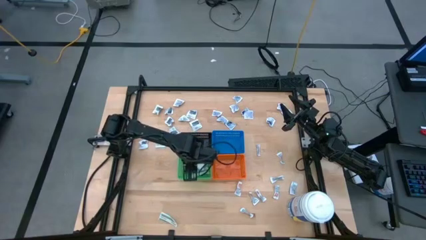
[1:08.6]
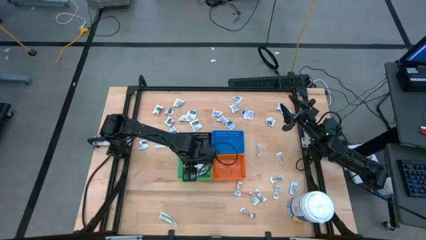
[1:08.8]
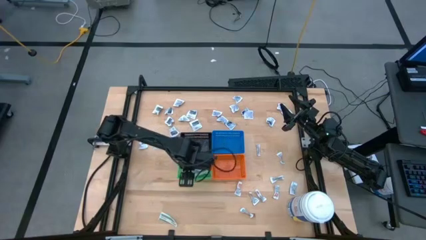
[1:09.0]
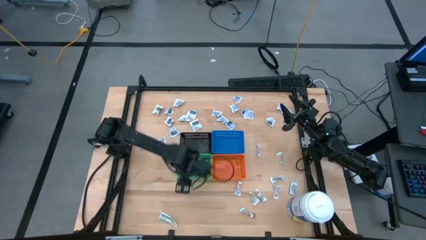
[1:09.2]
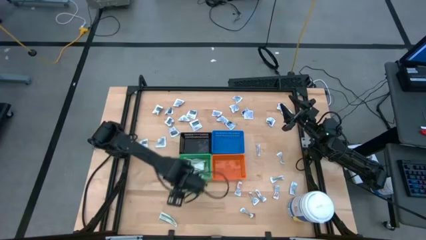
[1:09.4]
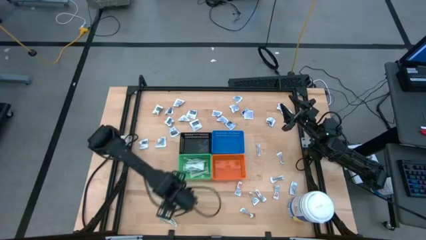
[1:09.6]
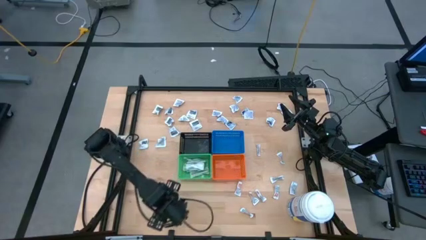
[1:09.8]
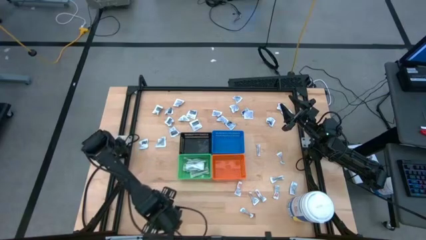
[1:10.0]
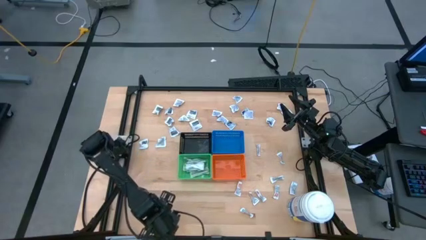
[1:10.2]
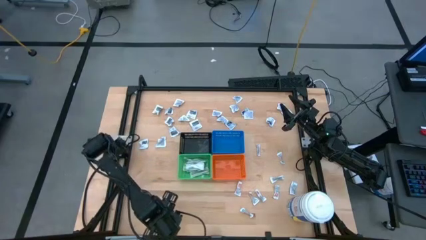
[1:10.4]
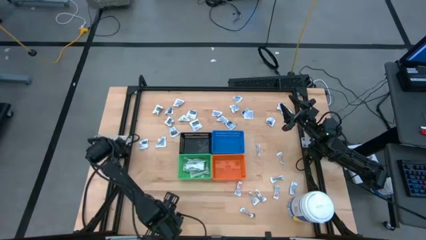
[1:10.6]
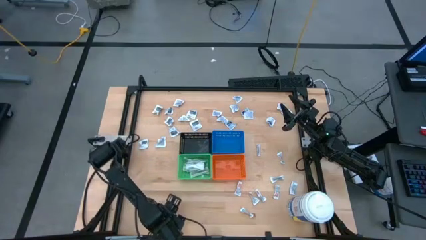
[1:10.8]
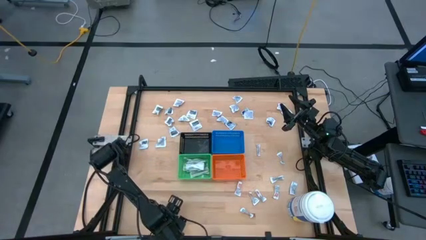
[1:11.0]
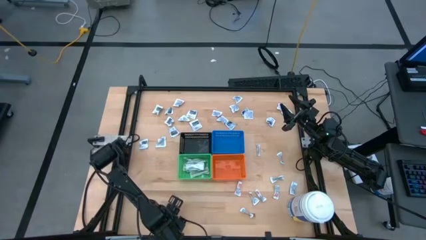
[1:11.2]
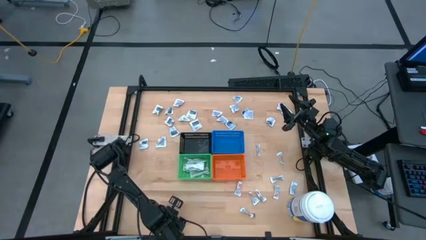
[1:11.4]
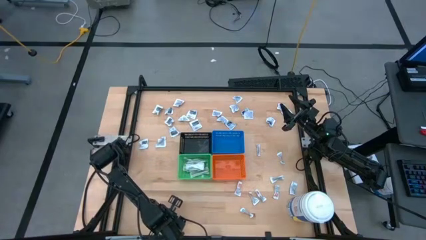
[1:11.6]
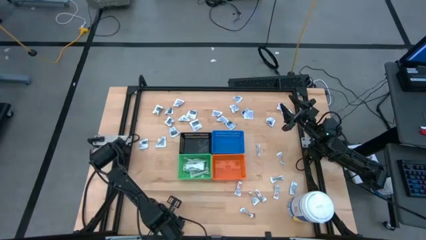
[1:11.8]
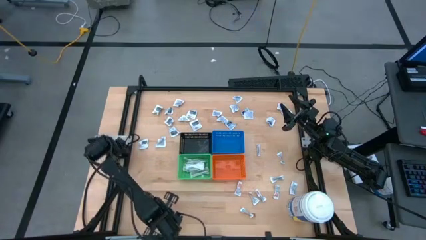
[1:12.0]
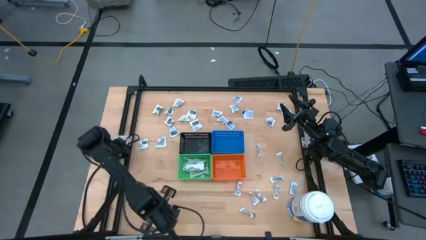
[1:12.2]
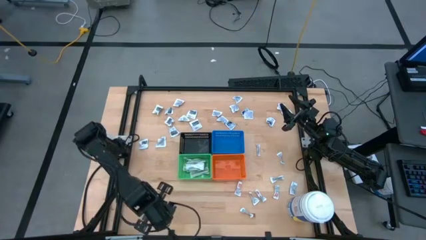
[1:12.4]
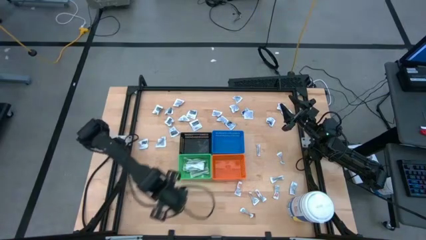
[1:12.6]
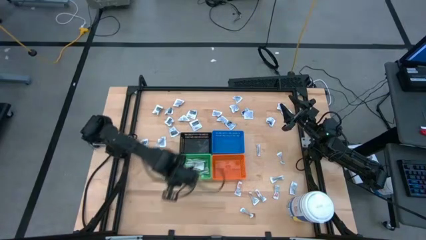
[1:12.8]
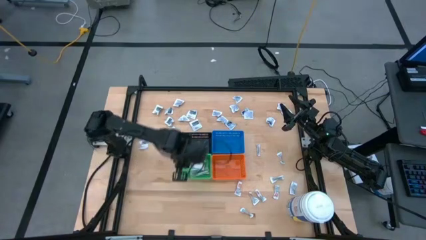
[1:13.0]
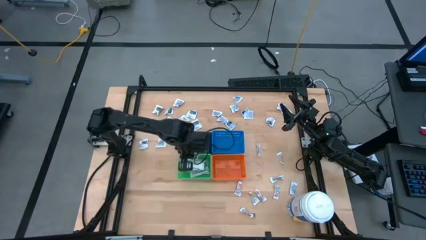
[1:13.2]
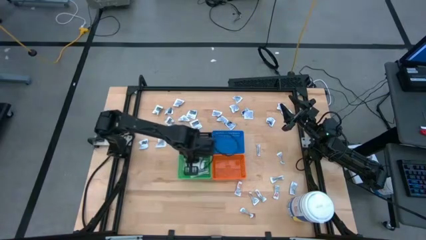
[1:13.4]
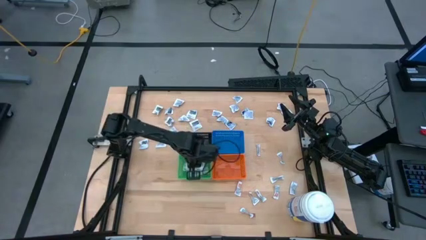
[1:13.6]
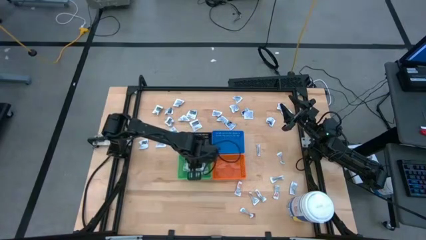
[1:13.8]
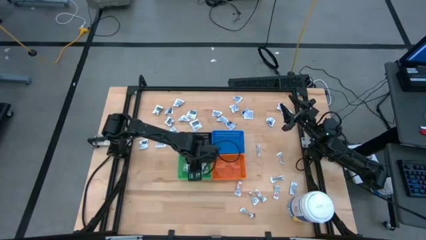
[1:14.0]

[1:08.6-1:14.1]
Task: Pick & Place First Aid Supplies
Put the bandage into the green bin

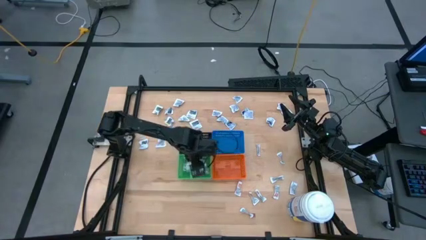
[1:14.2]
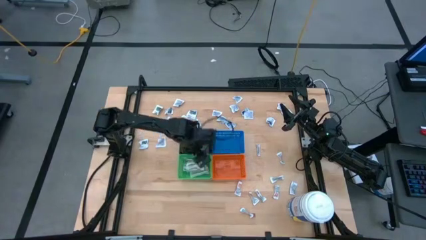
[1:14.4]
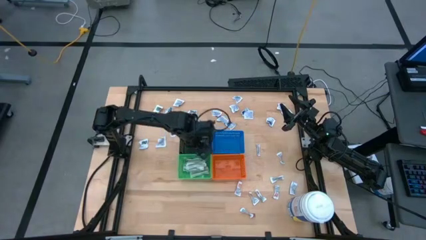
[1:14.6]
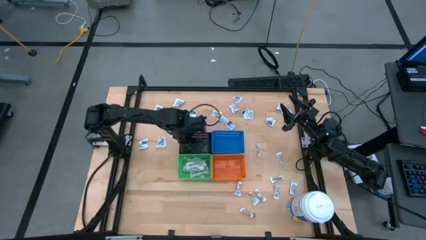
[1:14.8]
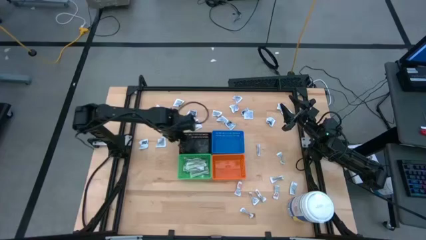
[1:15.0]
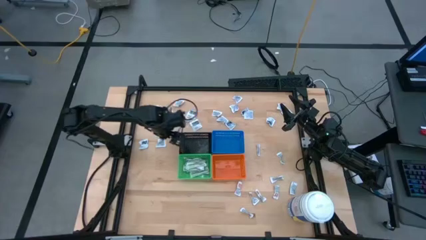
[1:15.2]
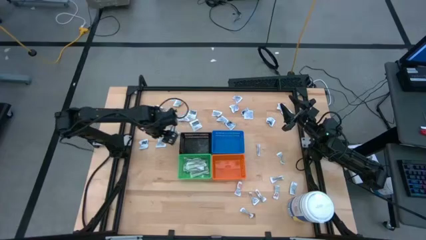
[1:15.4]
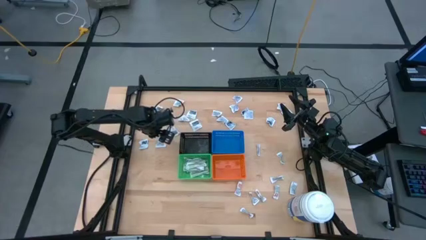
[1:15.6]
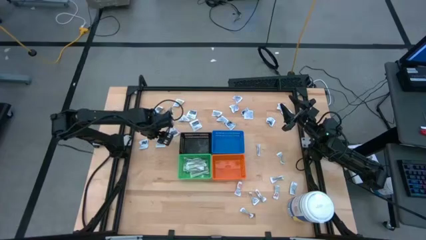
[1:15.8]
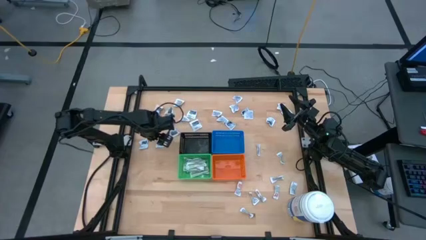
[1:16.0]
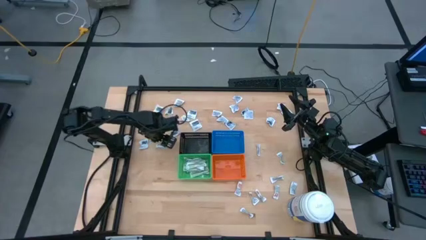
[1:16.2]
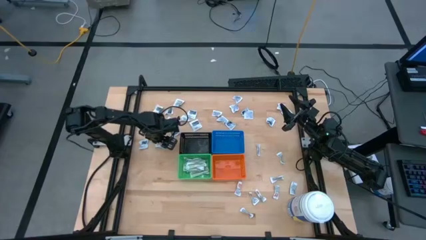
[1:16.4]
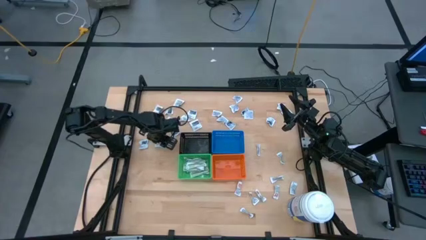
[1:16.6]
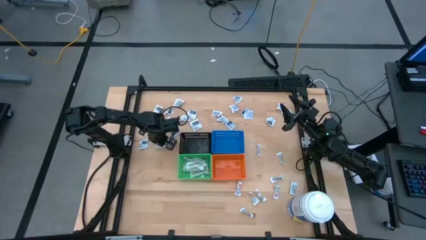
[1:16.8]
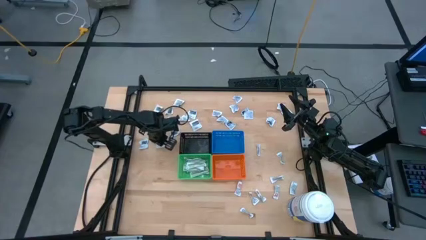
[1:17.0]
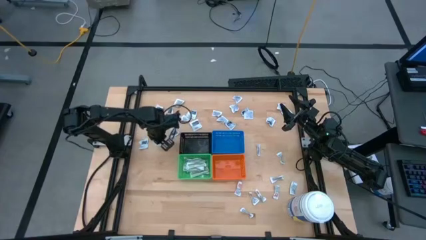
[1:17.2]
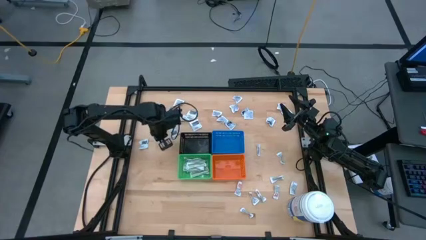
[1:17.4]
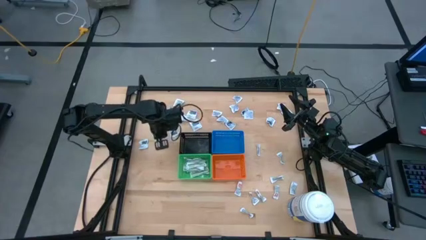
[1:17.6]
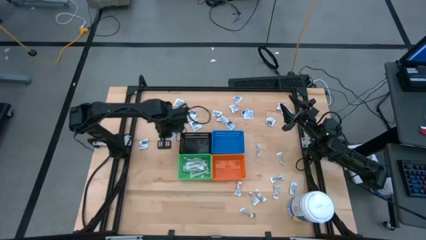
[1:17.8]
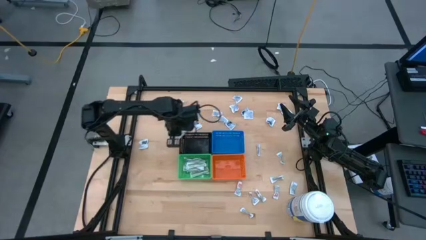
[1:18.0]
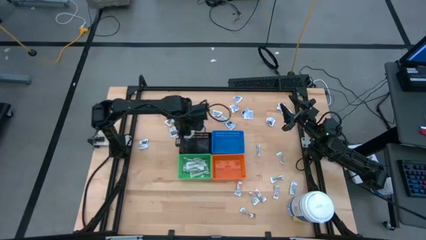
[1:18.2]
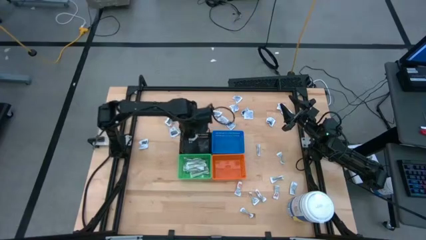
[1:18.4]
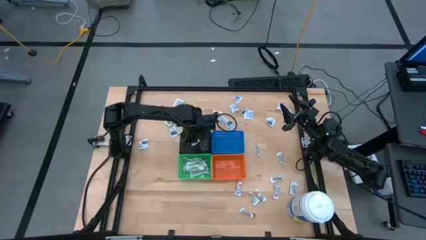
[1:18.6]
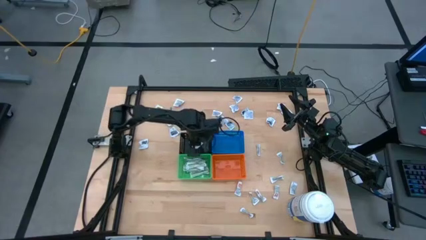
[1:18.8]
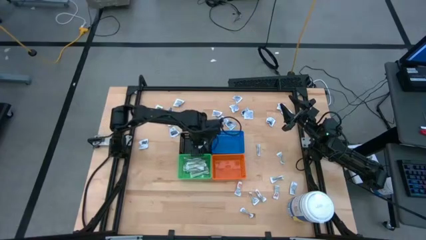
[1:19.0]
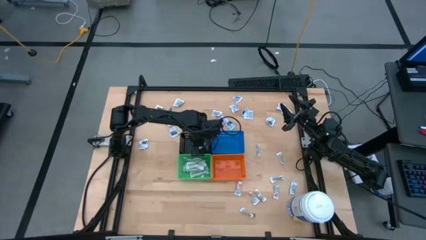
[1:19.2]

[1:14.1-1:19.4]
Put the towelette pack into the black bin

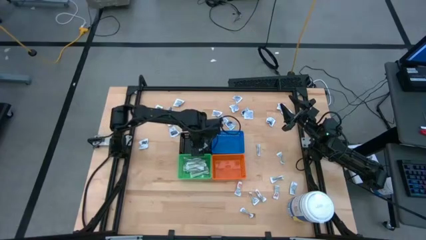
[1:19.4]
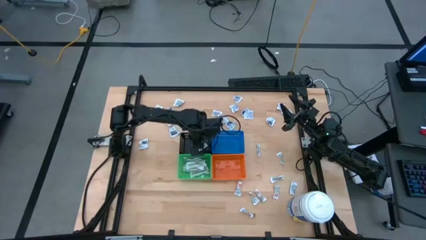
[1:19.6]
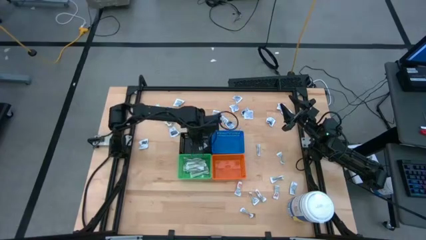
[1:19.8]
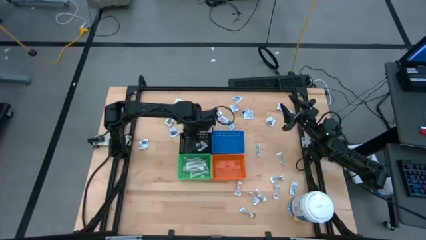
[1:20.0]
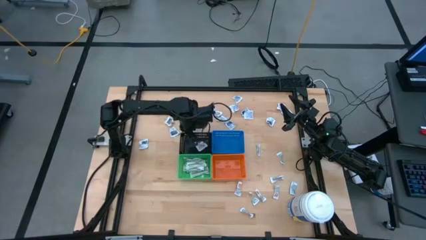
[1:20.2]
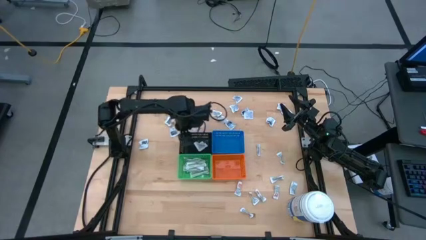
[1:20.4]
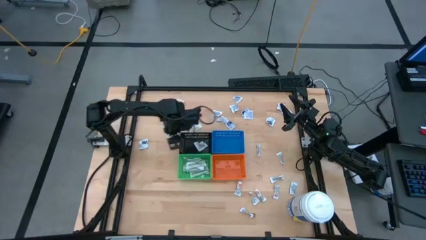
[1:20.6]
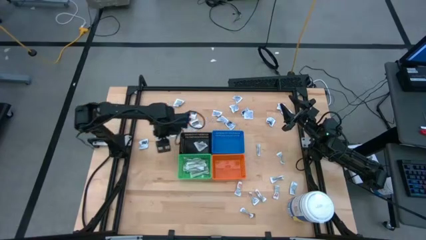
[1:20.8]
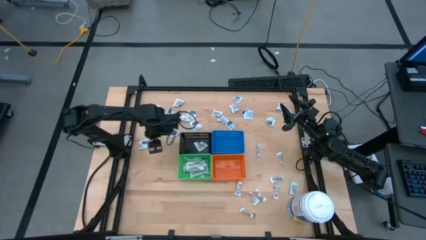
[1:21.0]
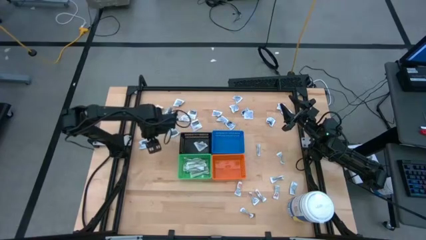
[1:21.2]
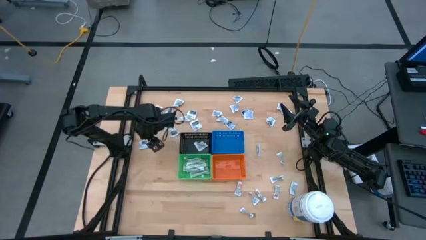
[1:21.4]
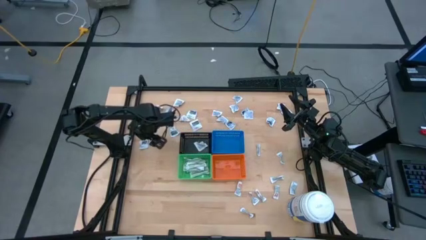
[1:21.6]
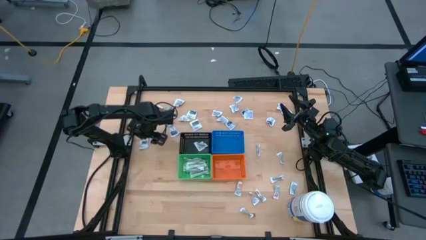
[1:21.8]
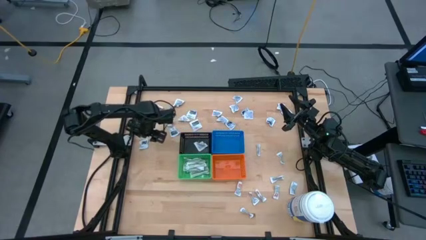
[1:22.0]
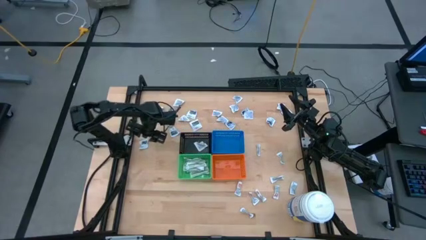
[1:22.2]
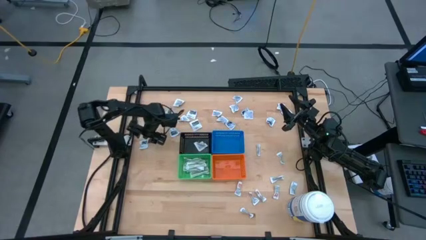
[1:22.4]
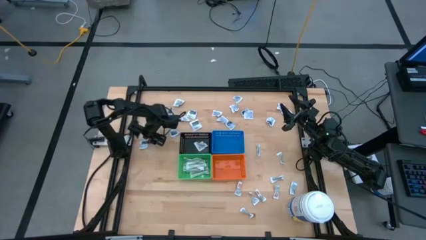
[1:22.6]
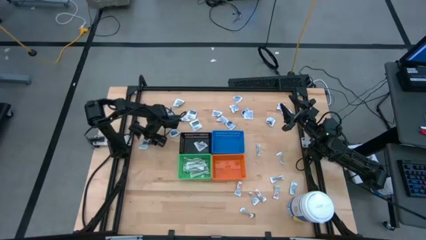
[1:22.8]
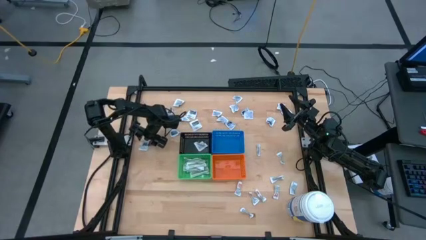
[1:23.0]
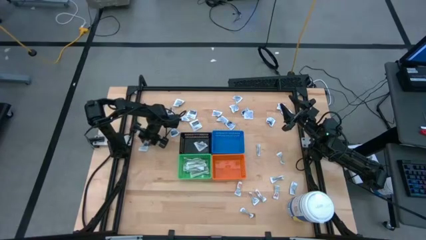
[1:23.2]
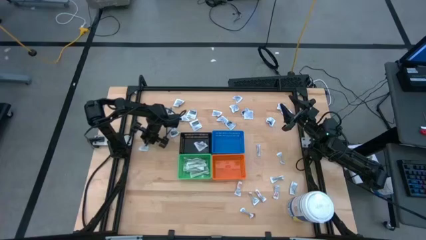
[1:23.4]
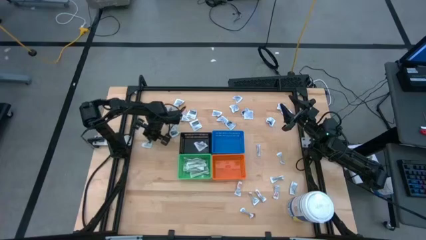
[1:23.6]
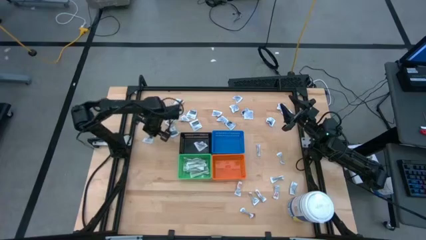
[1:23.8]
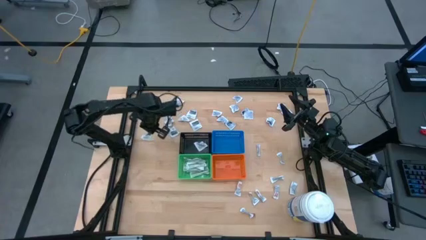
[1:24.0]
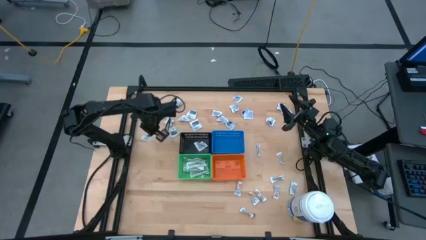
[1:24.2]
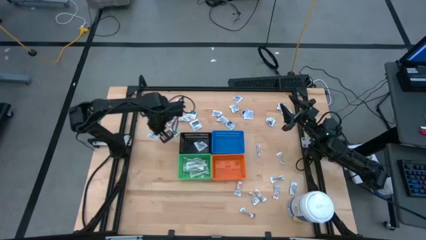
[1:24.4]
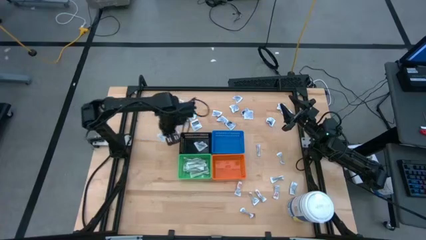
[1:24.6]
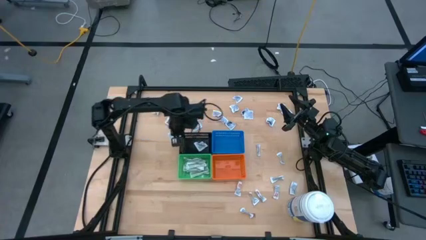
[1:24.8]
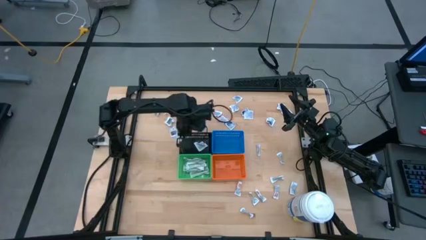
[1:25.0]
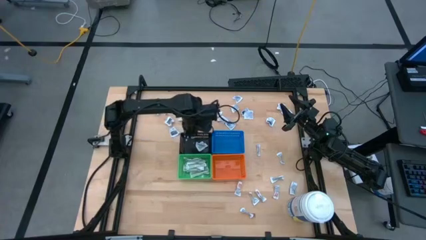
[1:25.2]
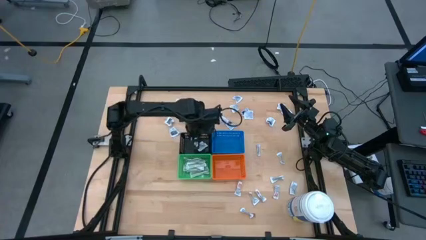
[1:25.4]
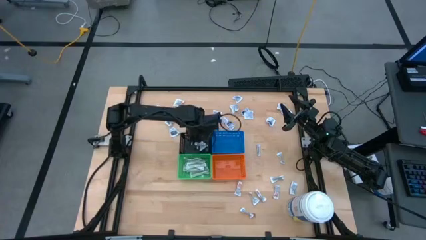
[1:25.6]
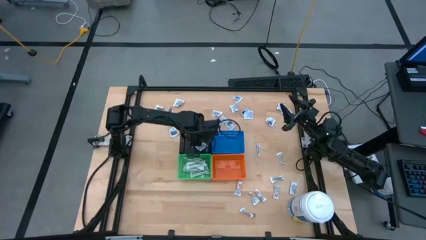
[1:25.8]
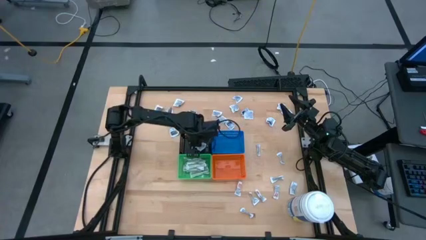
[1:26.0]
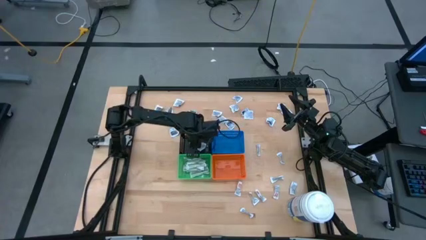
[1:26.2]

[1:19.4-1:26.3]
Put the towelette pack into the black bin
